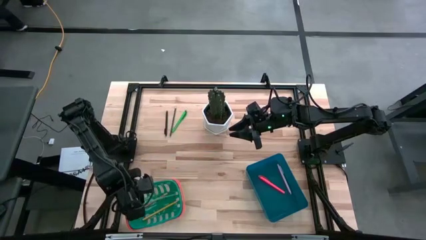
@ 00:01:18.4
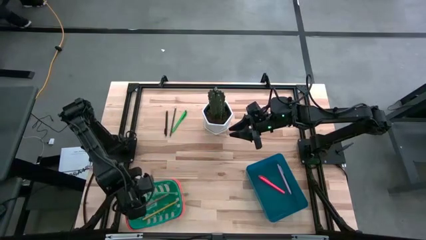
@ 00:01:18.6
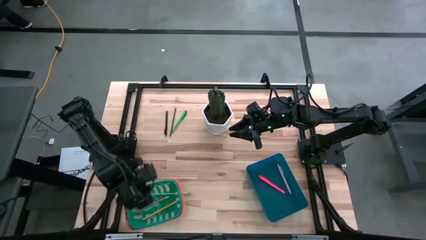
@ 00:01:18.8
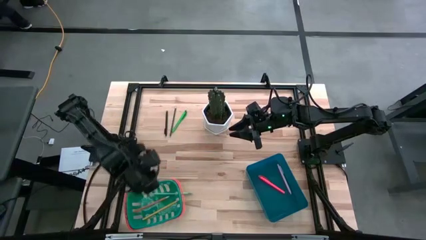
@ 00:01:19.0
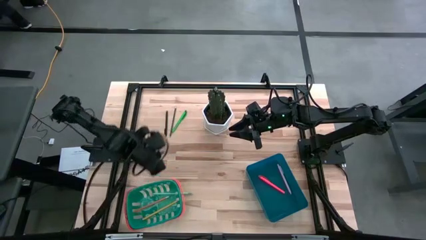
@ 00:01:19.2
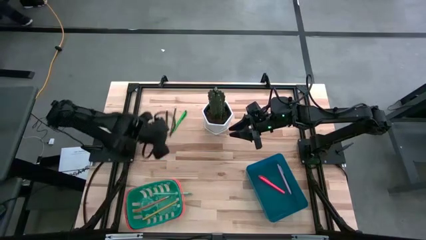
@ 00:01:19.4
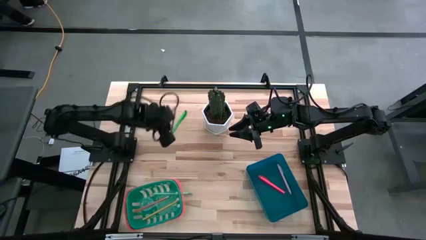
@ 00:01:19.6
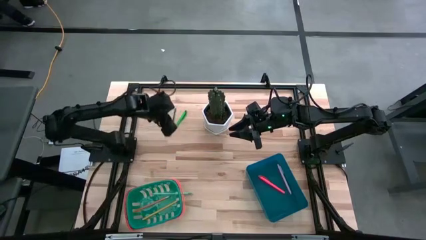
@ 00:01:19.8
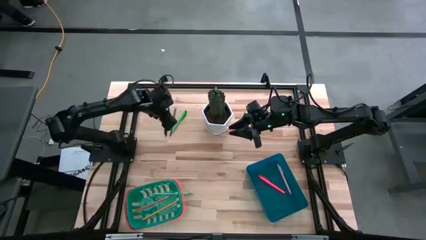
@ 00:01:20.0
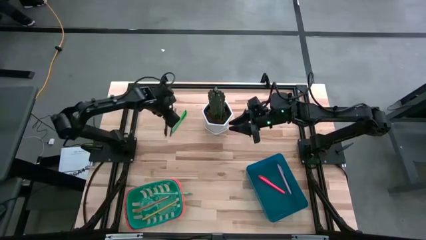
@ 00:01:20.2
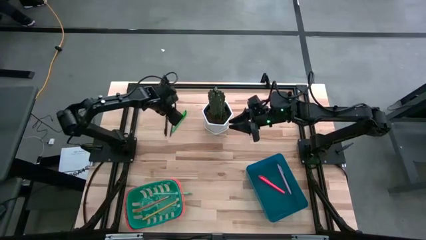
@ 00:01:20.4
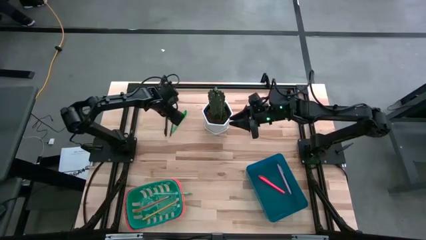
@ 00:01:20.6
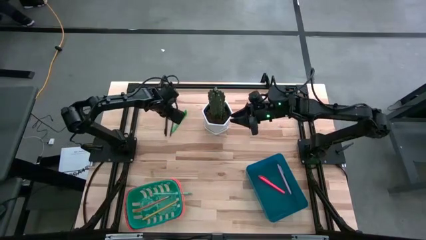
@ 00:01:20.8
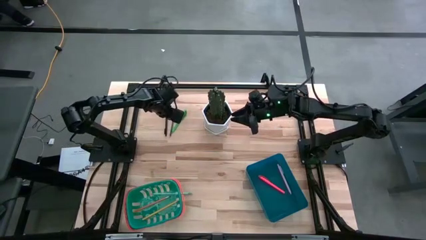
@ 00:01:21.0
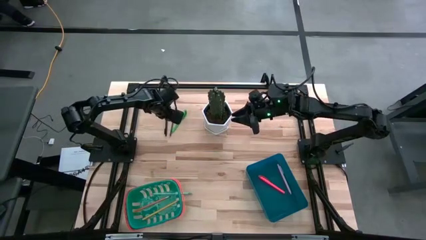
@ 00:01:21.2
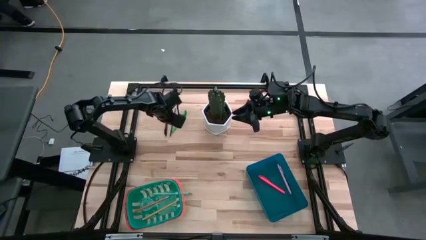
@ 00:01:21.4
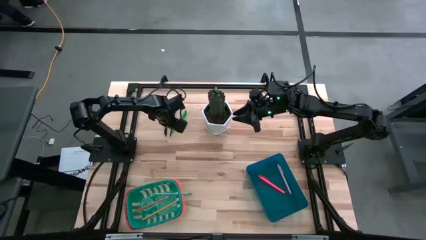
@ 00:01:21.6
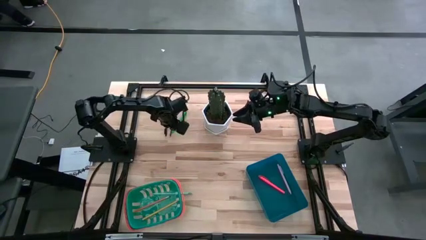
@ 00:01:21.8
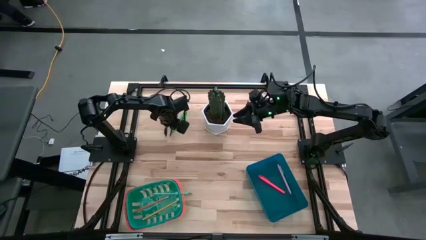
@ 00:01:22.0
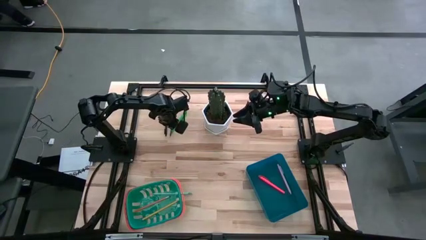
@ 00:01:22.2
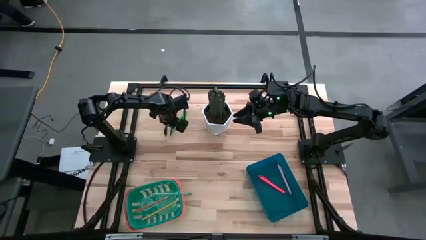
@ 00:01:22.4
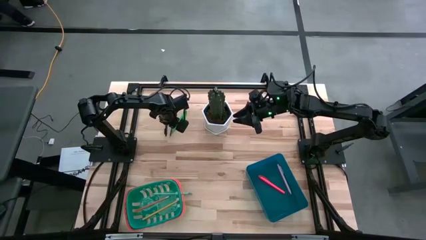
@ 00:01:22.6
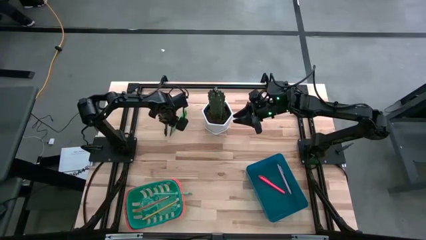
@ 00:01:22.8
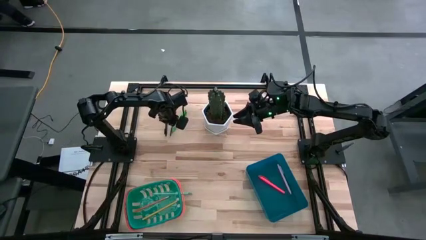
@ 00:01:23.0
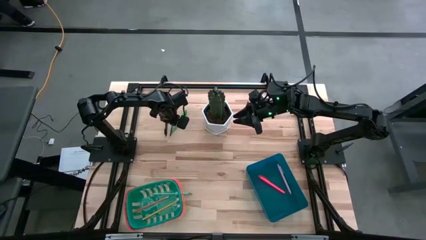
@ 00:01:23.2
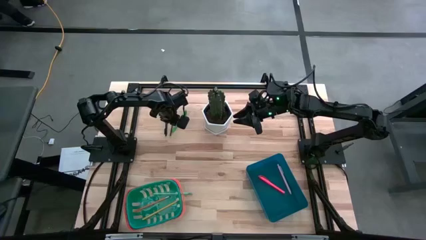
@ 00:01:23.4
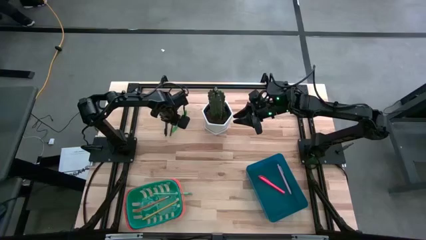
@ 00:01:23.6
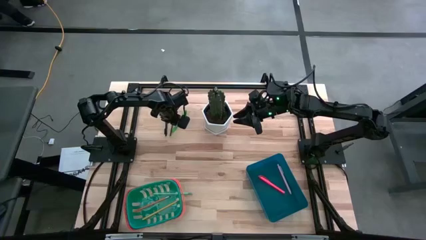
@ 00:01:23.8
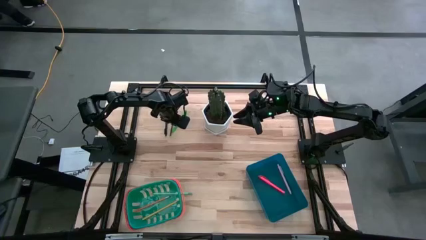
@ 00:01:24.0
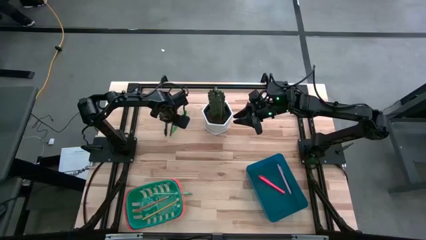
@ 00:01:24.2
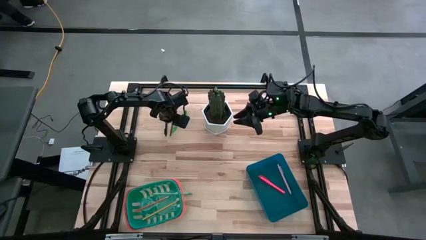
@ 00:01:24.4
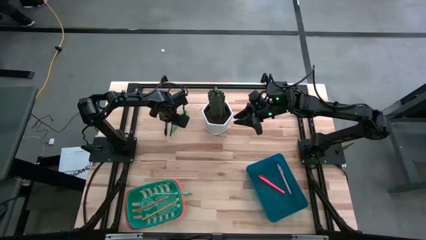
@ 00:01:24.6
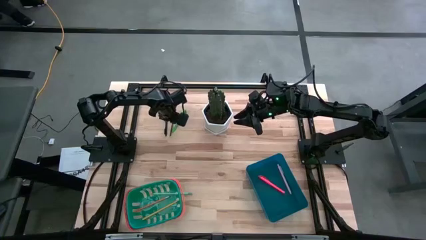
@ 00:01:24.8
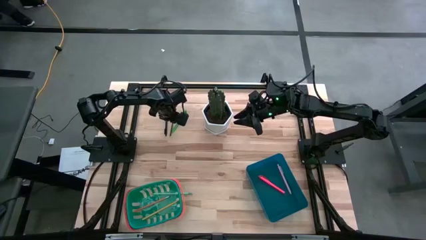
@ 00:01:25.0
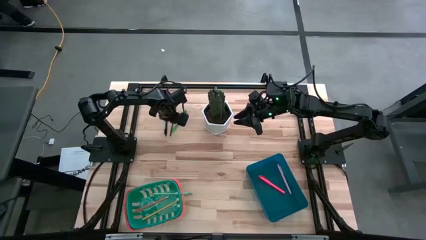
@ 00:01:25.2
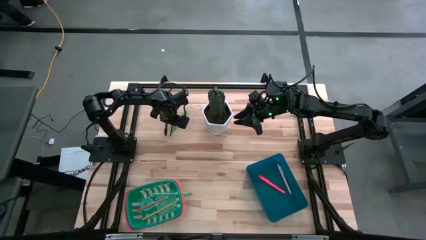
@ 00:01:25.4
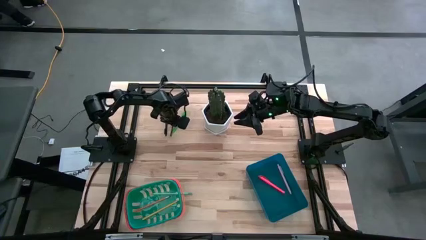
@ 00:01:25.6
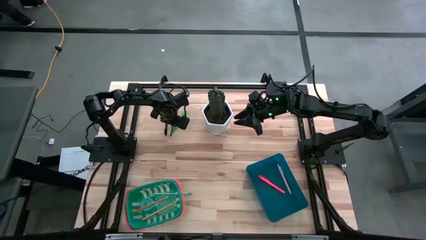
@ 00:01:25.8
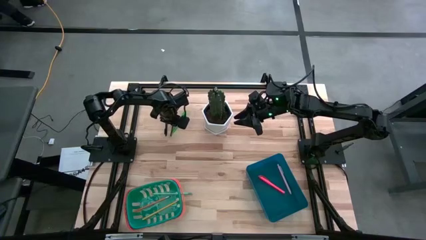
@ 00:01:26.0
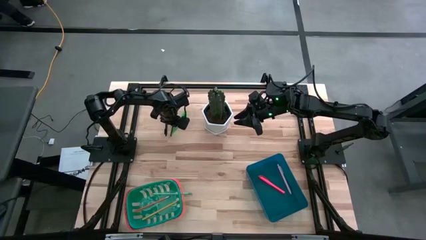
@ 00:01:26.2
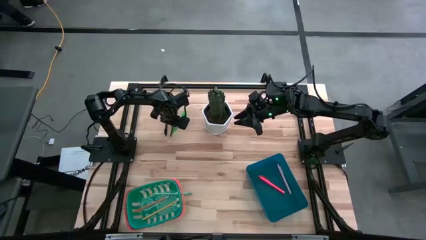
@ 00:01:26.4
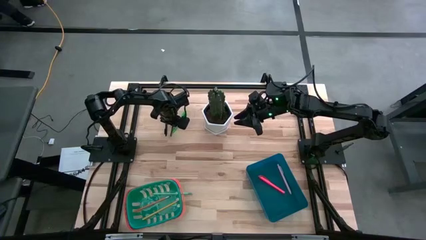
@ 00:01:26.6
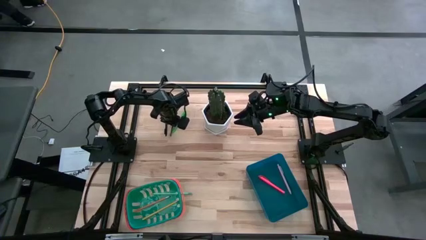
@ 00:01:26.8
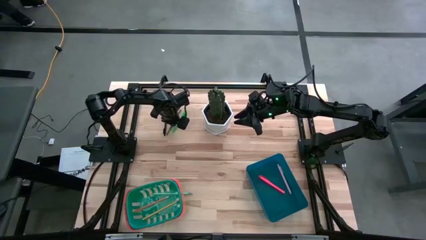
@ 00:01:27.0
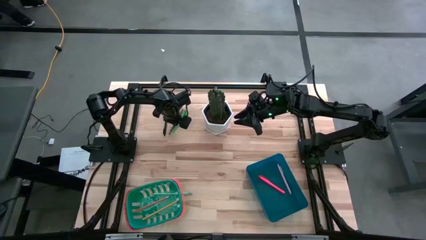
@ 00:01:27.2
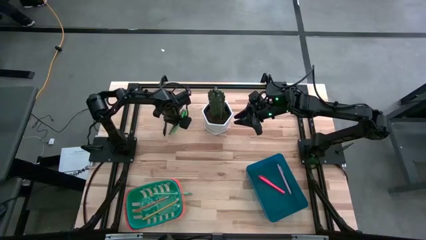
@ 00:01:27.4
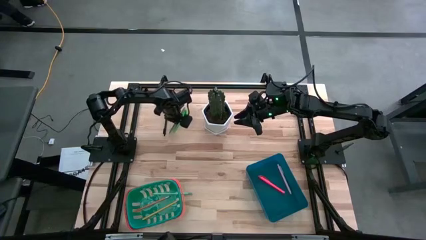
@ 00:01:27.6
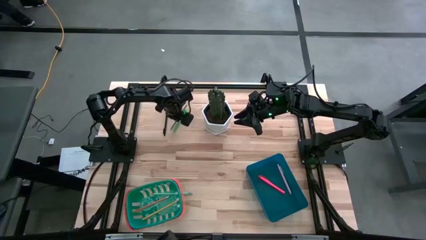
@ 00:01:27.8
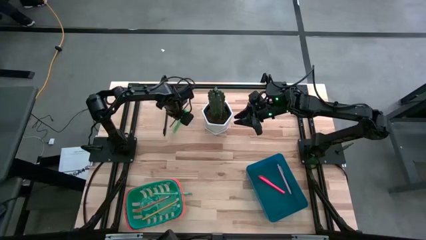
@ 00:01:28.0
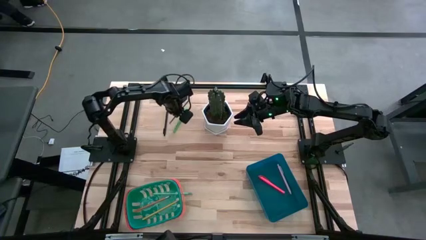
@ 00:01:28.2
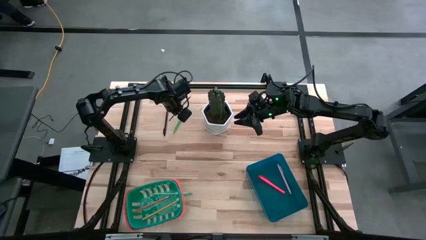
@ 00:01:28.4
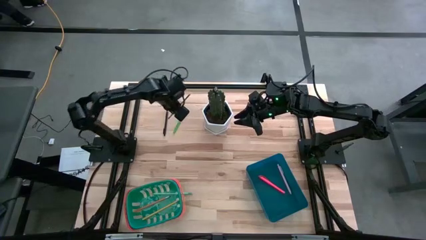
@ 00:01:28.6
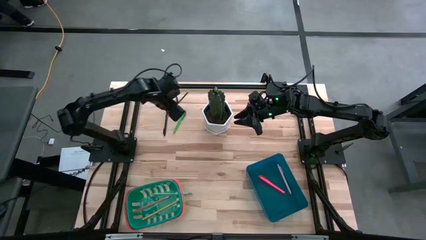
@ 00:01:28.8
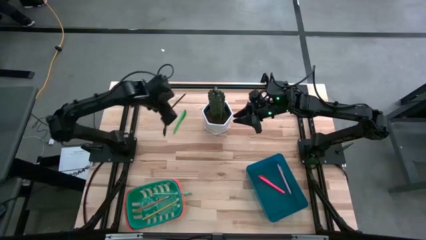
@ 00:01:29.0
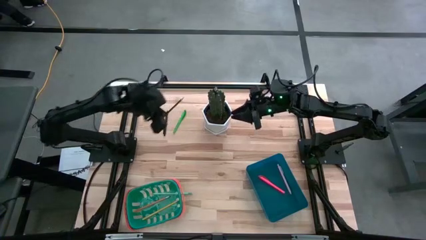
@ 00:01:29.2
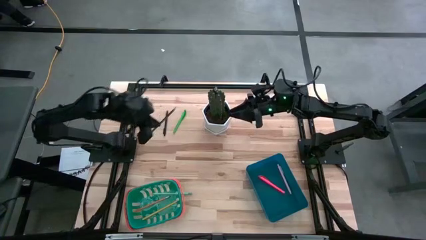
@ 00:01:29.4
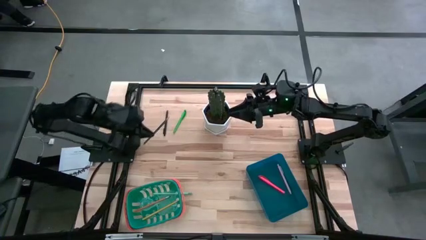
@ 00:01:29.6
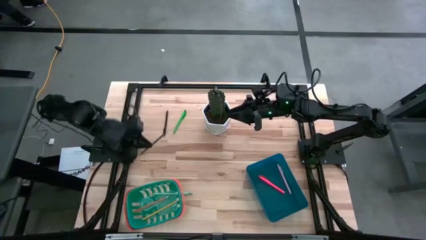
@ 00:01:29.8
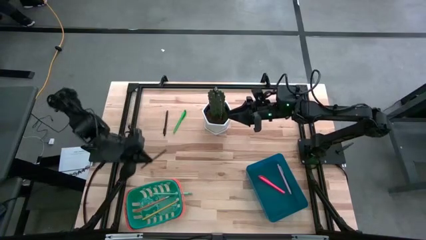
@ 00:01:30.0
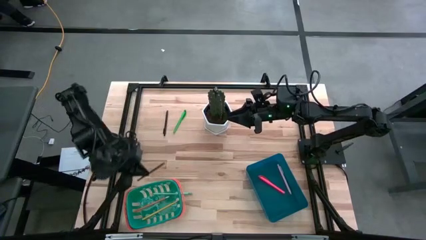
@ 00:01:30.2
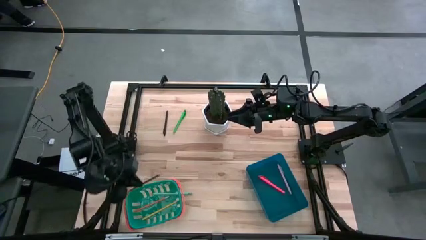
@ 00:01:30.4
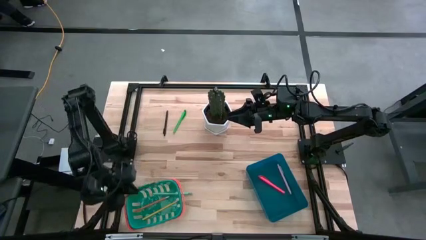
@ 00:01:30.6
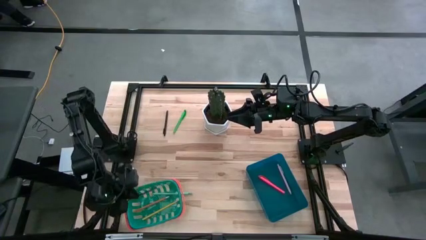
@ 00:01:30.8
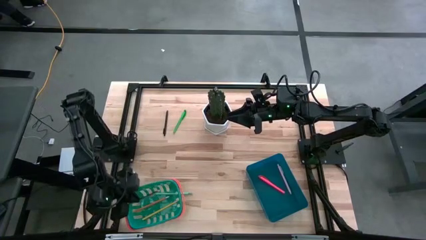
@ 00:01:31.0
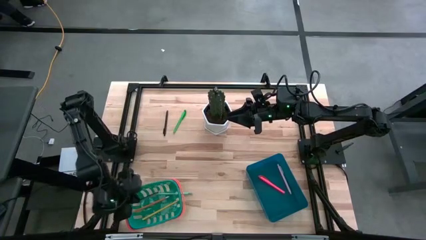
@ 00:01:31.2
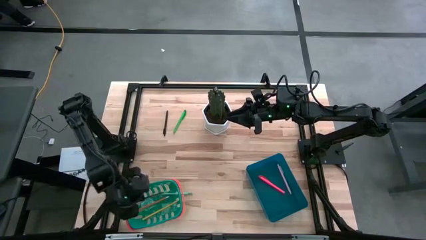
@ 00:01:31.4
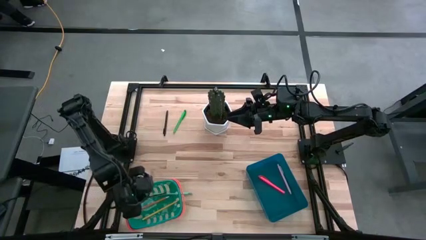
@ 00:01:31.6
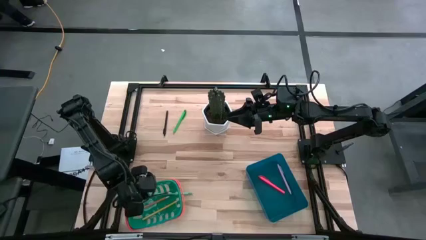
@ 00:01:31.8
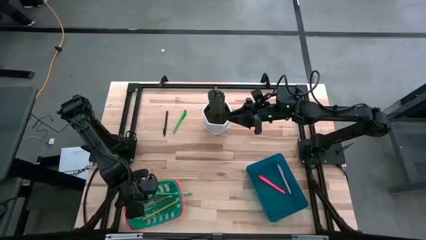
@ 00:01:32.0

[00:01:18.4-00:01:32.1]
Task: Sort pens & pencils
Put the blue pencil into the green bin
